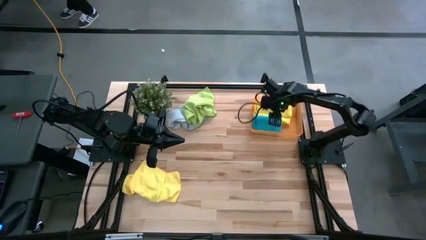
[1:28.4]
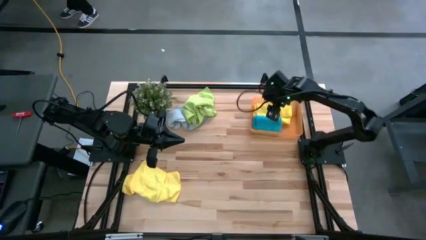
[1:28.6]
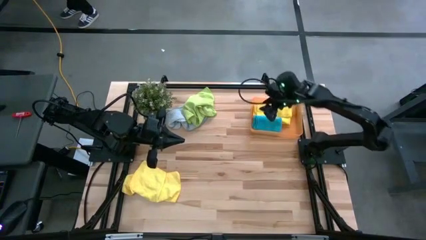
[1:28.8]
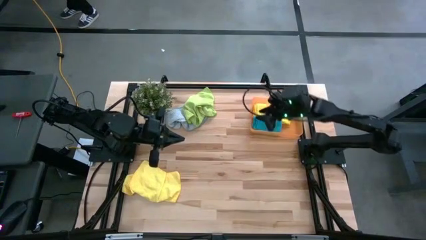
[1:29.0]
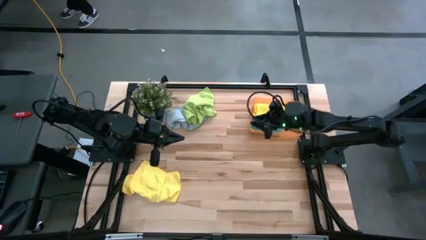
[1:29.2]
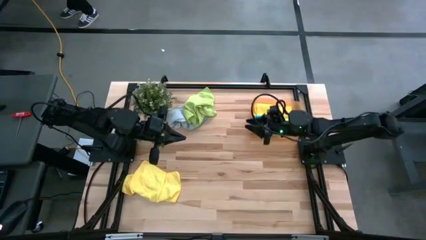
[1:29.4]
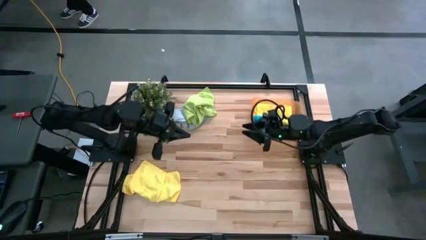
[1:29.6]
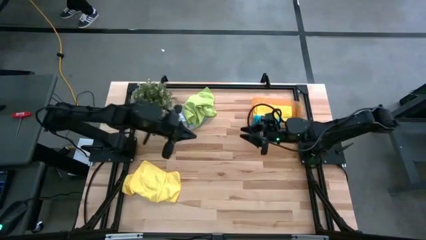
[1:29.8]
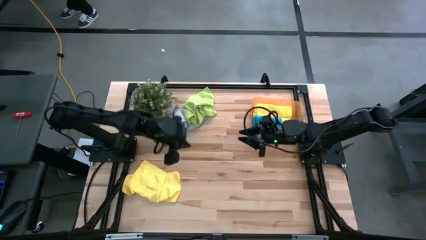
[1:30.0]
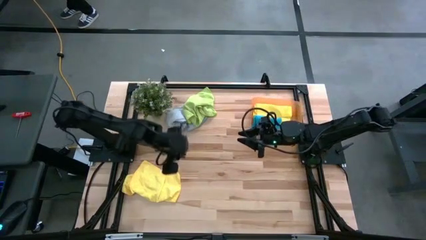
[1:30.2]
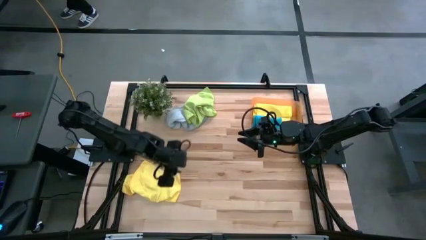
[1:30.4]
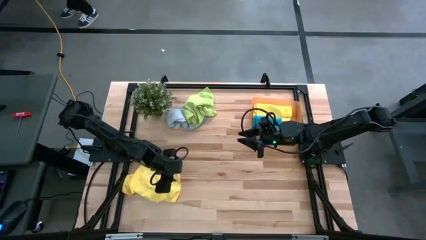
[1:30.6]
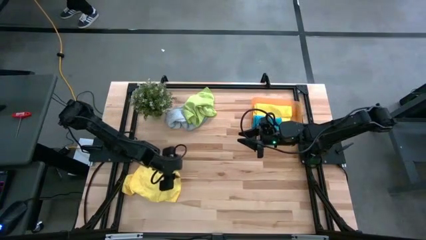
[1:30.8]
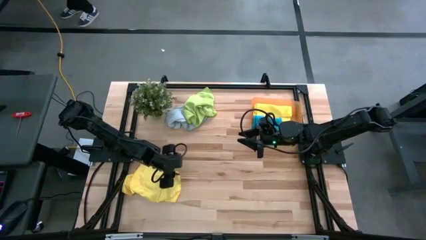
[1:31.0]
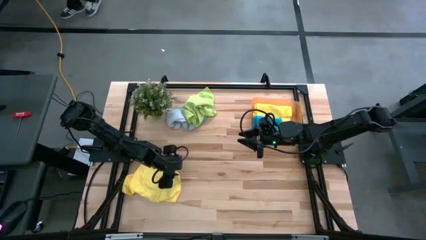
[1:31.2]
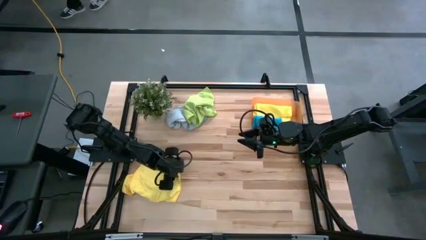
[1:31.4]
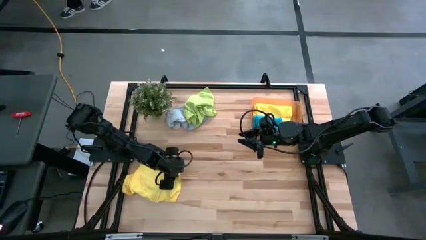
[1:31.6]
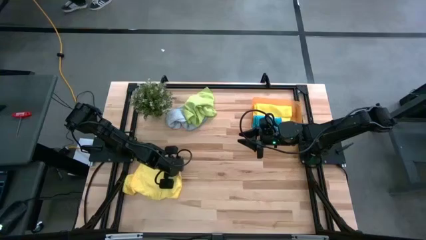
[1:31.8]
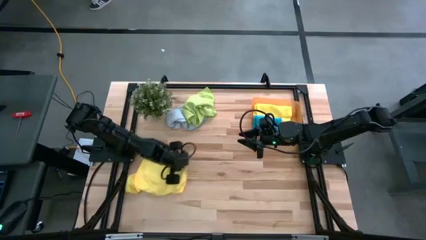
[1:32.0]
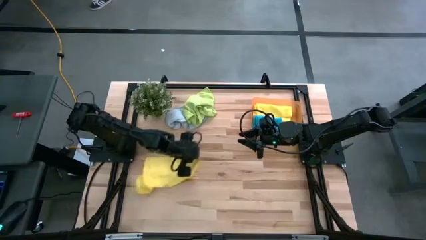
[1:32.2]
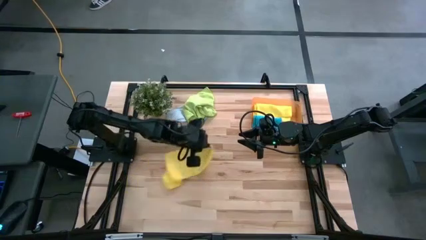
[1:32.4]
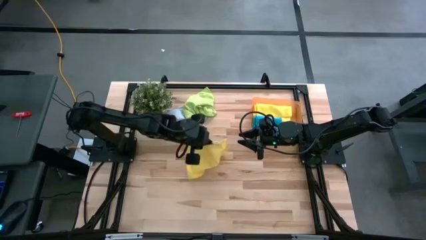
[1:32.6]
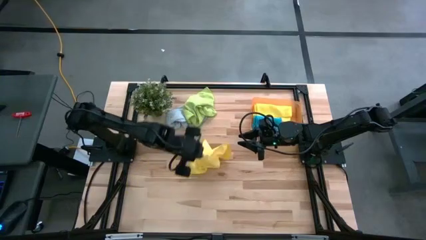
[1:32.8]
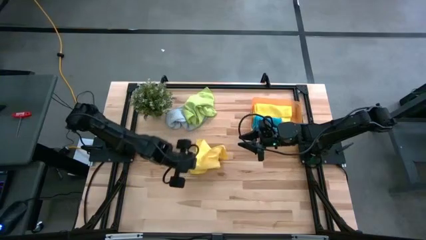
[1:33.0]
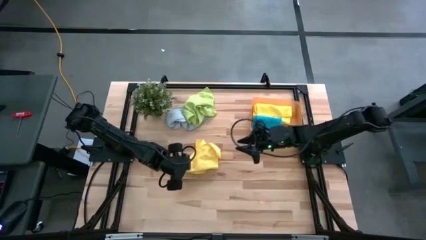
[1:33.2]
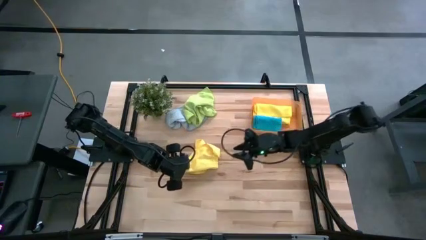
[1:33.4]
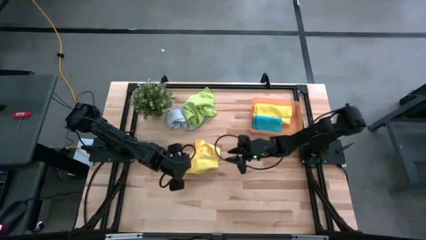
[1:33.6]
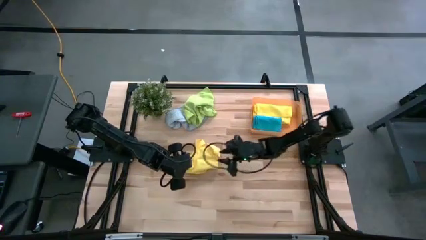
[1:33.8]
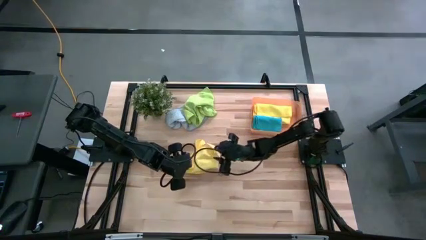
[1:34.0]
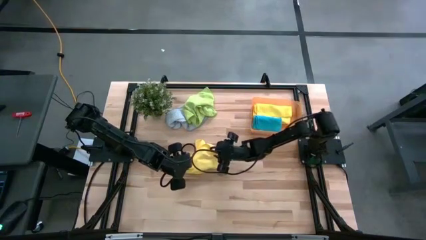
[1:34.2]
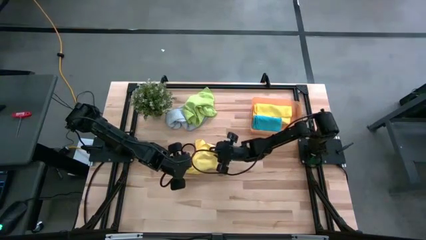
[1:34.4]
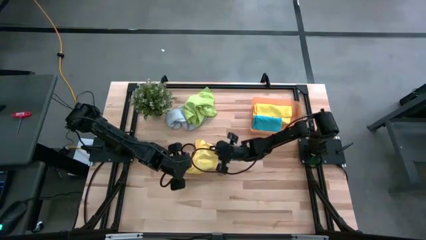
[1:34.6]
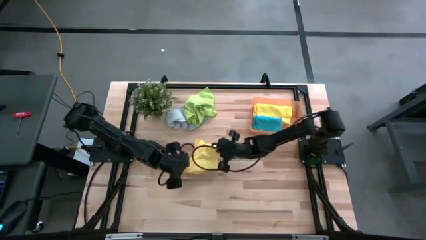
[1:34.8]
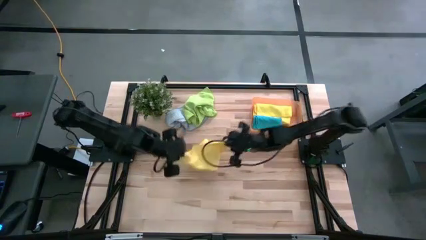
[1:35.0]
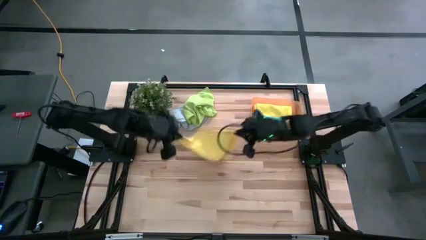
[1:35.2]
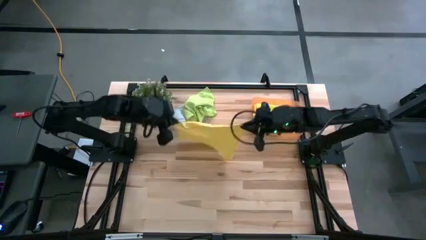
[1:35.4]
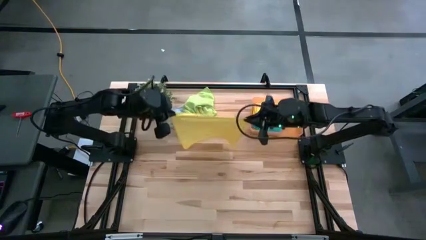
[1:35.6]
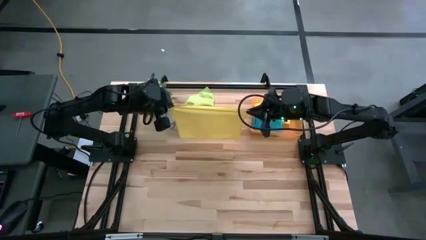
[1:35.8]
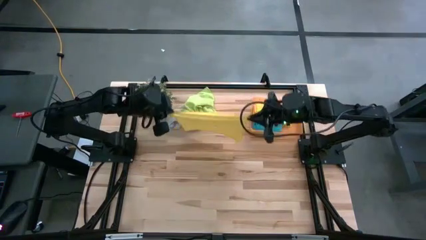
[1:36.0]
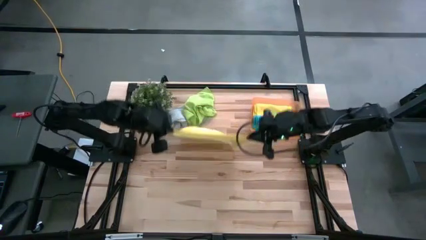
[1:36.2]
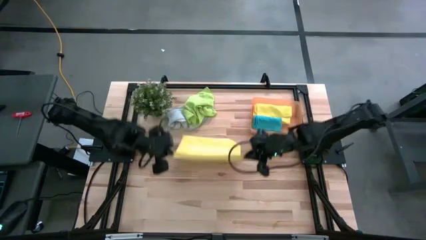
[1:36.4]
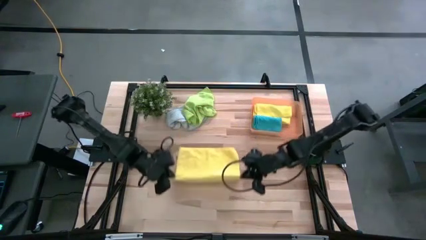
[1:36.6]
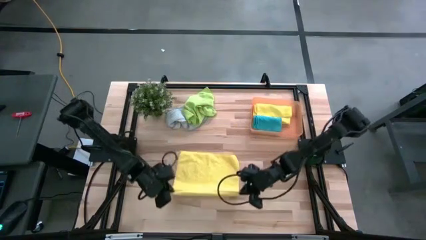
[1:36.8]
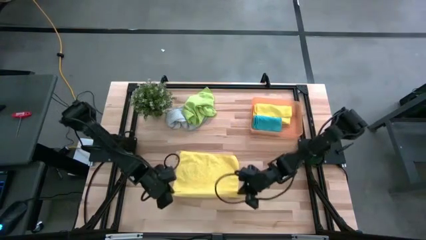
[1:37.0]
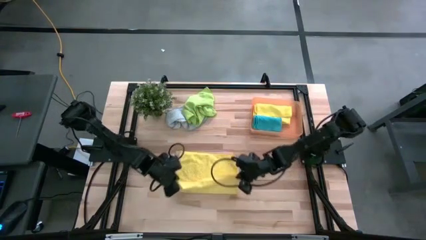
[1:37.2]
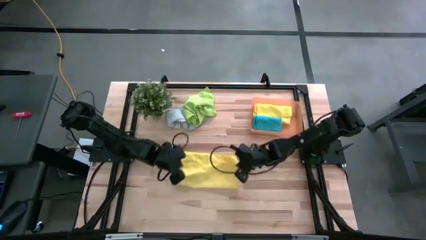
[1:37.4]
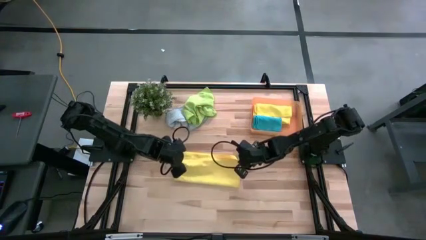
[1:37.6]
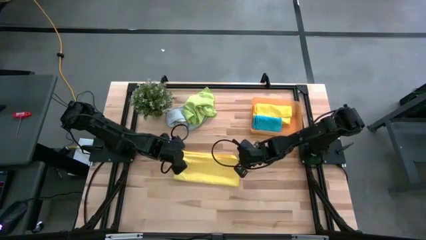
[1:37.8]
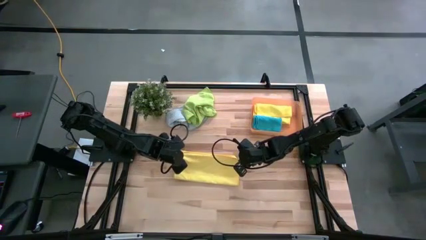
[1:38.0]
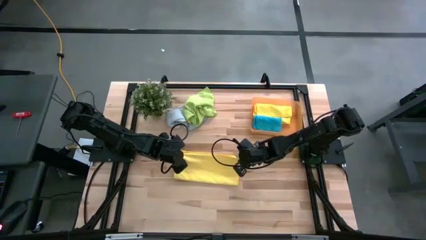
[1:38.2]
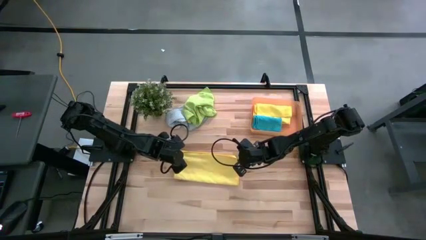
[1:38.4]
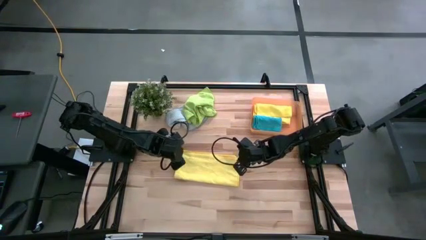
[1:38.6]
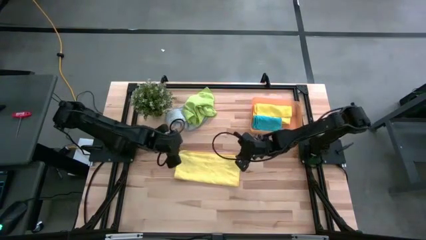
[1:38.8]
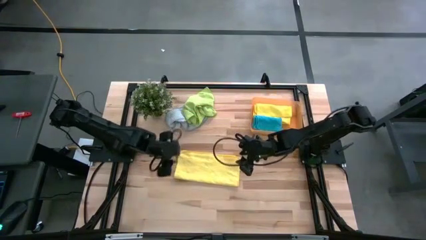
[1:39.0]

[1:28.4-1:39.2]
Task: Fold microfiber towels
Fold the yellow microfiber cloth

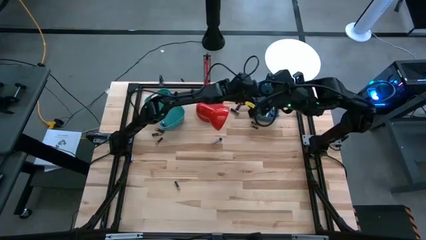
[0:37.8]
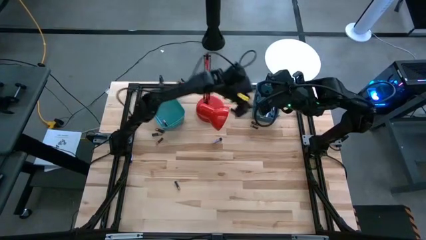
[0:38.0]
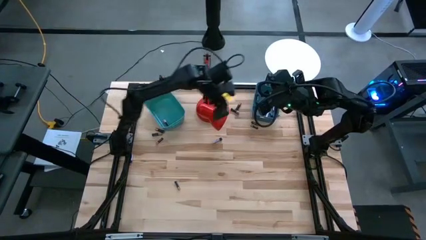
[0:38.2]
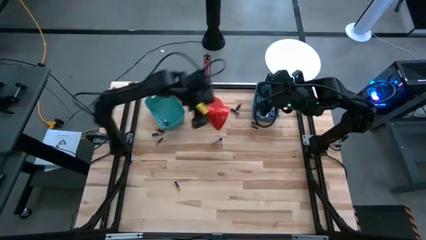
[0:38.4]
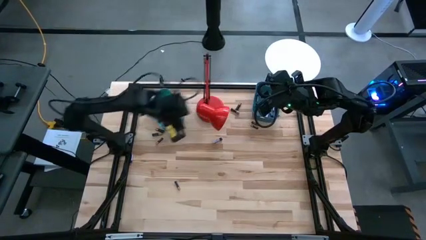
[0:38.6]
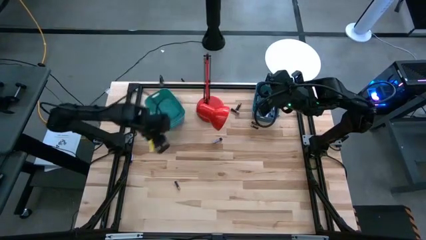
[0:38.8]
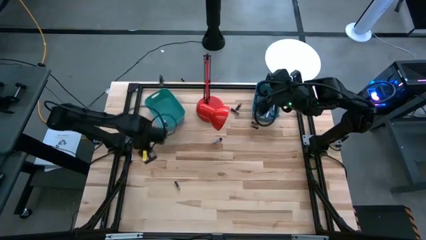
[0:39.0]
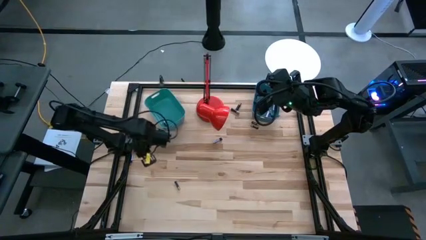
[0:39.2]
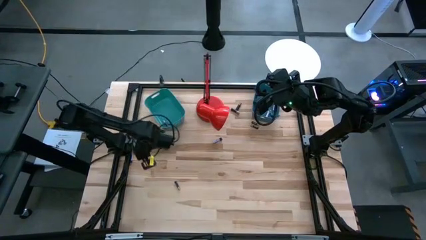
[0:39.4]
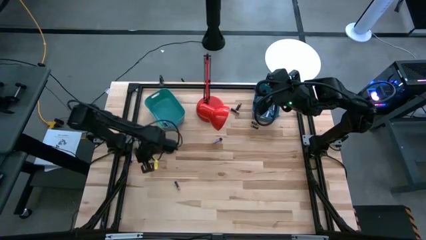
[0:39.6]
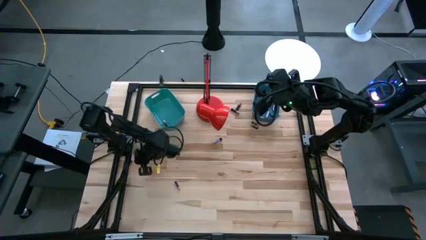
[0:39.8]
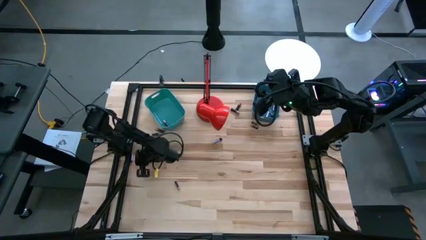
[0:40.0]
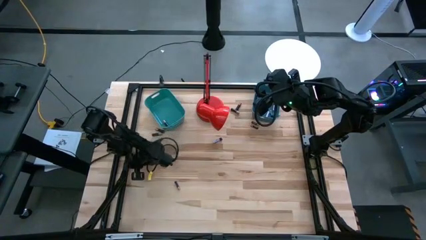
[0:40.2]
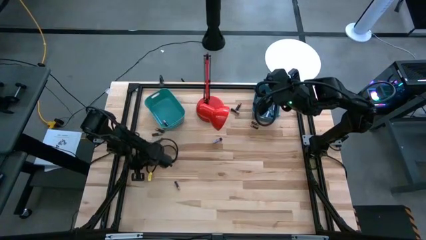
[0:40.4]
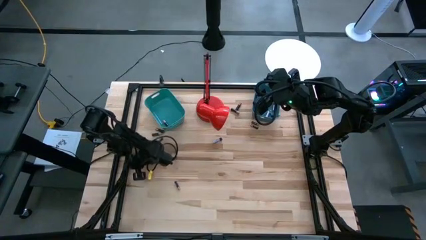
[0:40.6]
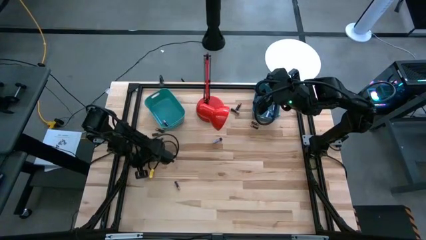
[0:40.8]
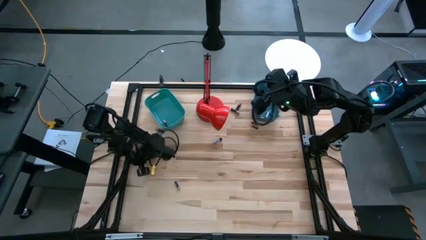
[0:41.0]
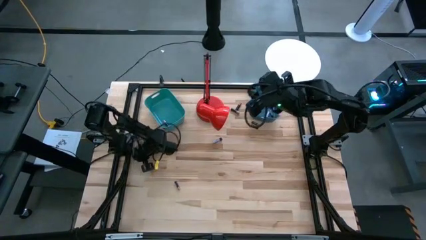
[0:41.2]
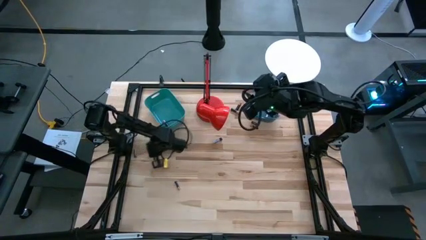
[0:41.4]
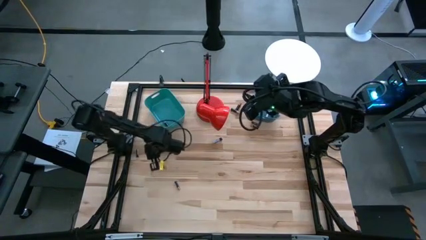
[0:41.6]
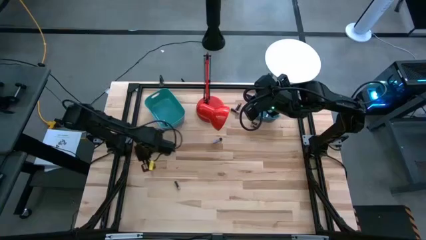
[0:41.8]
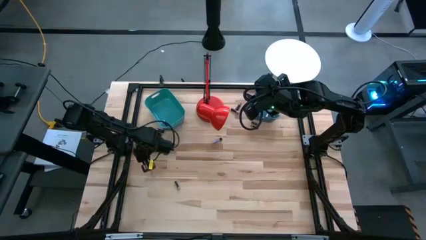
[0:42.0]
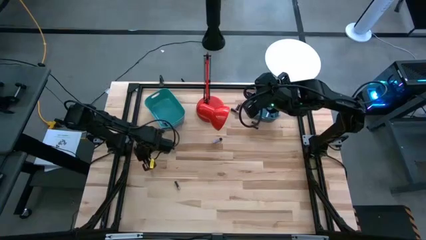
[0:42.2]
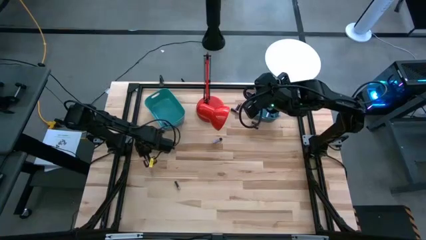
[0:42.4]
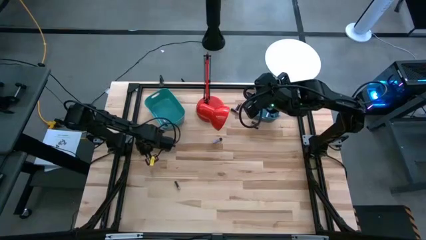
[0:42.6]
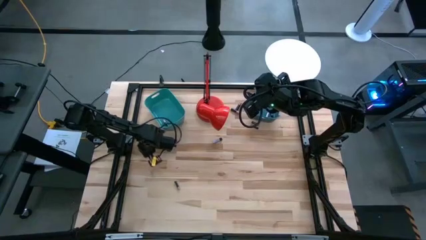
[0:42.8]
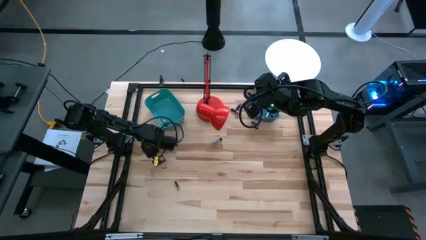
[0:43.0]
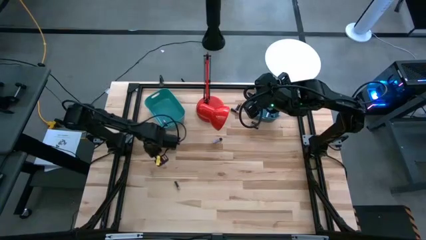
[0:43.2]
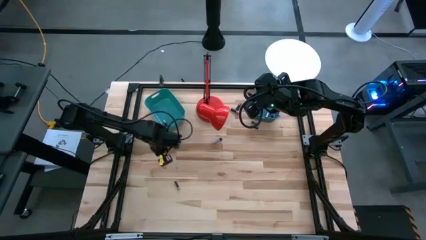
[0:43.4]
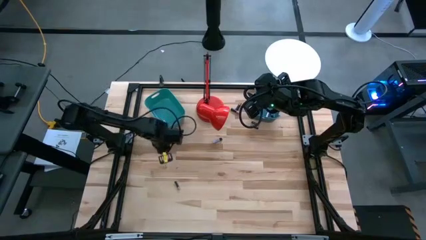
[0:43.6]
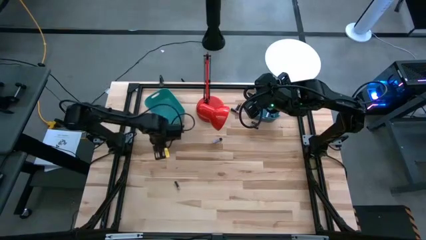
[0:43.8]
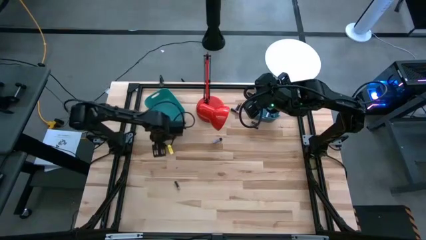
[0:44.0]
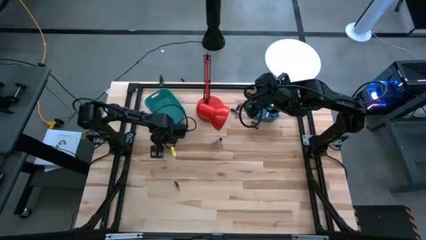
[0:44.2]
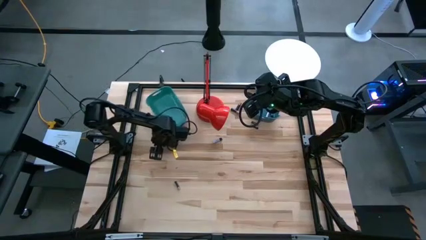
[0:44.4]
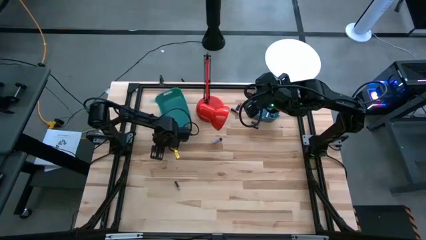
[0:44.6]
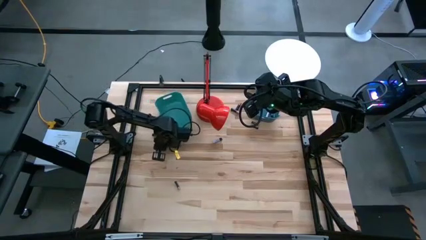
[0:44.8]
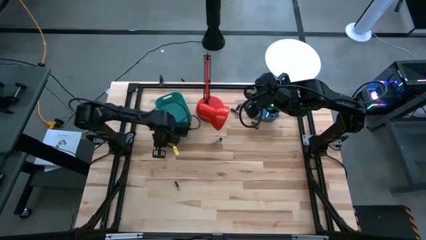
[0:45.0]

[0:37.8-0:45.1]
Task: Sort batteries
Put the silver battery into the blue bin
